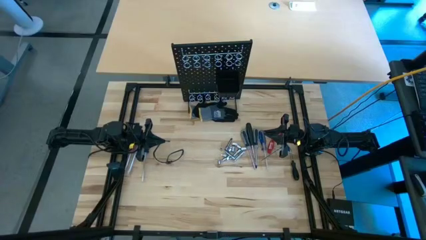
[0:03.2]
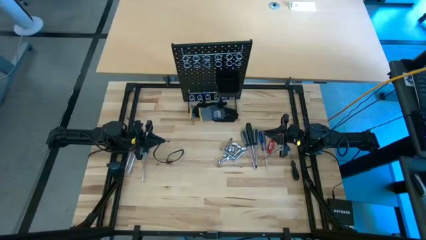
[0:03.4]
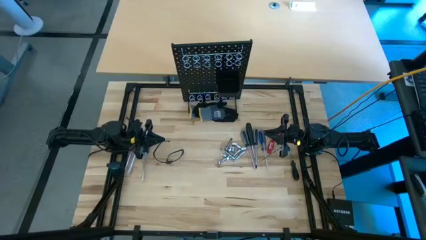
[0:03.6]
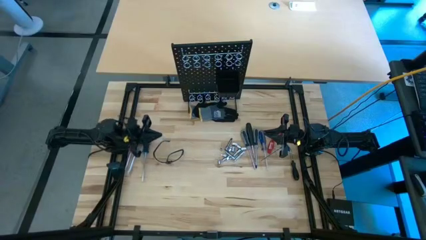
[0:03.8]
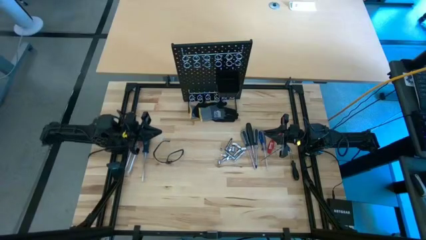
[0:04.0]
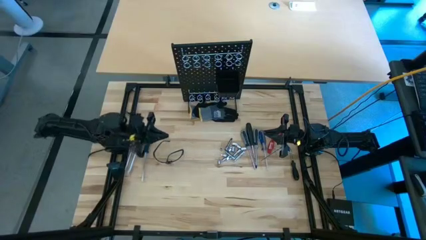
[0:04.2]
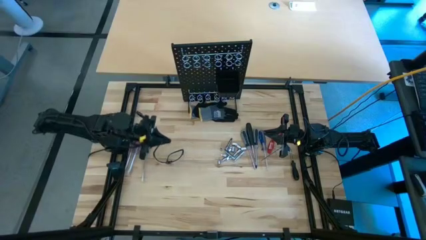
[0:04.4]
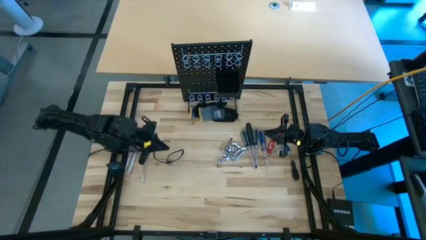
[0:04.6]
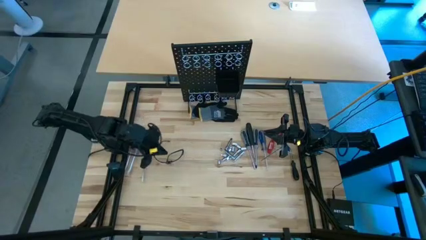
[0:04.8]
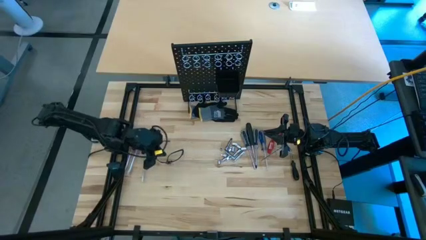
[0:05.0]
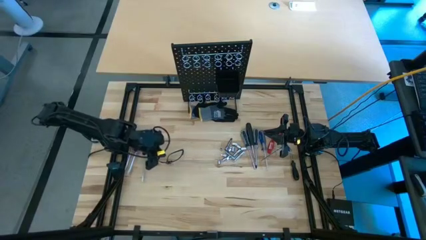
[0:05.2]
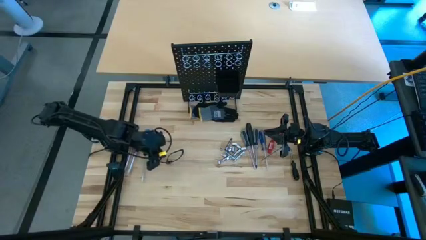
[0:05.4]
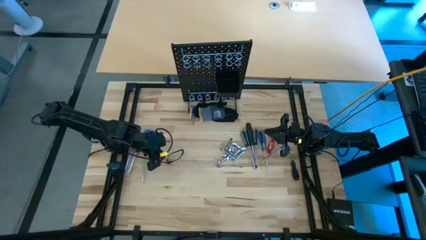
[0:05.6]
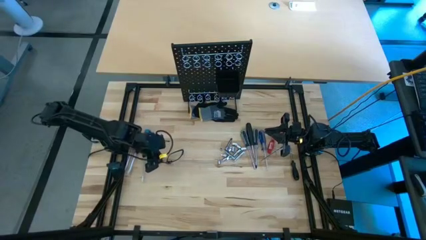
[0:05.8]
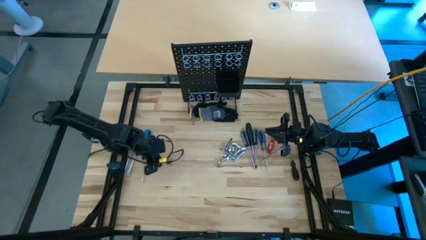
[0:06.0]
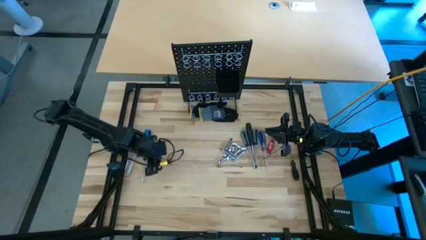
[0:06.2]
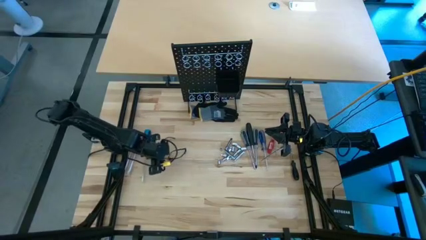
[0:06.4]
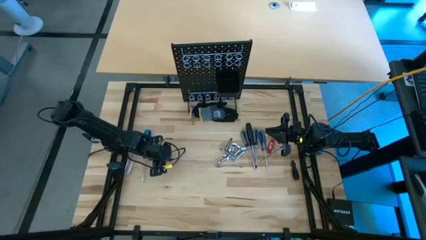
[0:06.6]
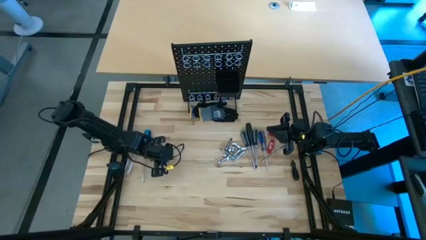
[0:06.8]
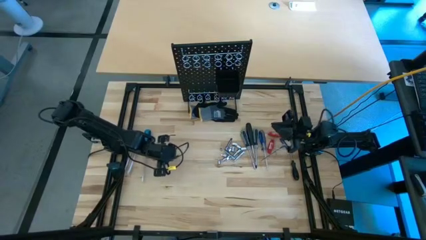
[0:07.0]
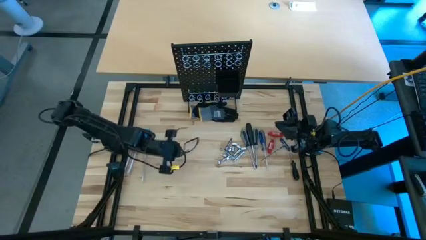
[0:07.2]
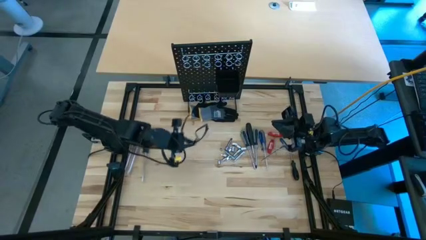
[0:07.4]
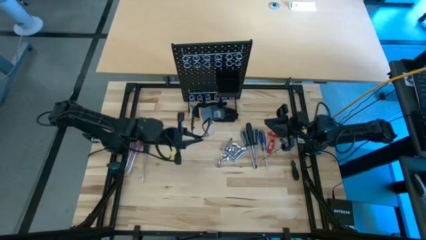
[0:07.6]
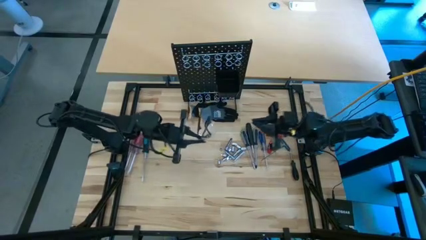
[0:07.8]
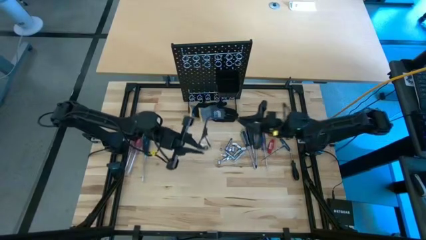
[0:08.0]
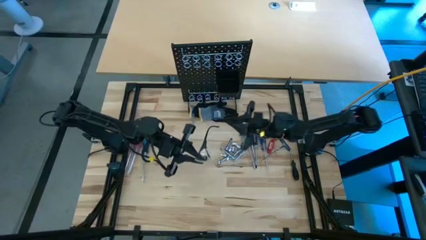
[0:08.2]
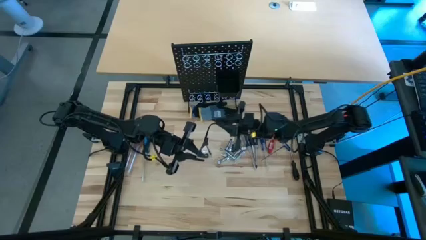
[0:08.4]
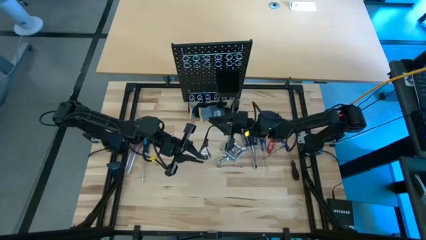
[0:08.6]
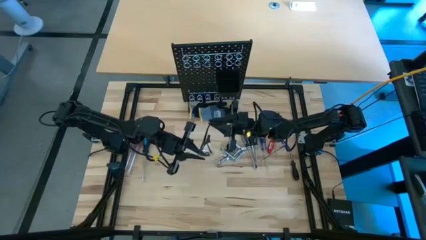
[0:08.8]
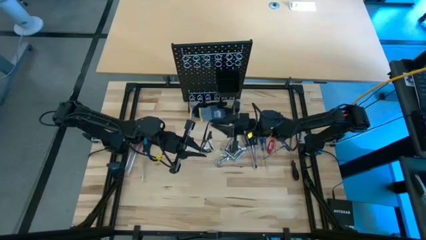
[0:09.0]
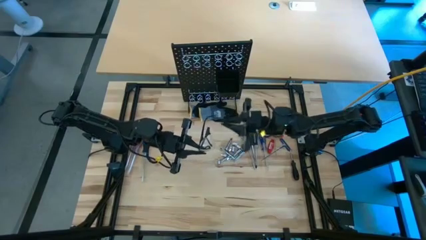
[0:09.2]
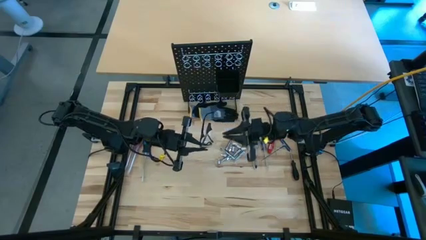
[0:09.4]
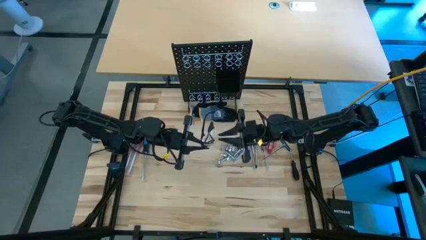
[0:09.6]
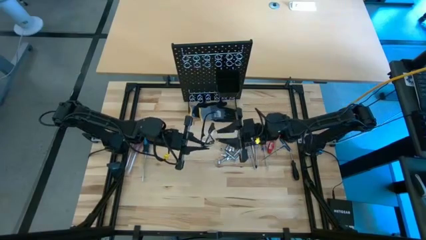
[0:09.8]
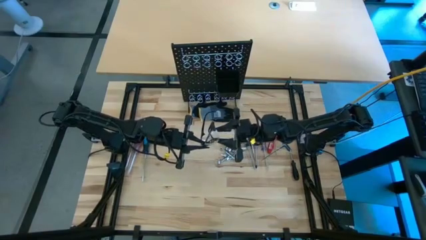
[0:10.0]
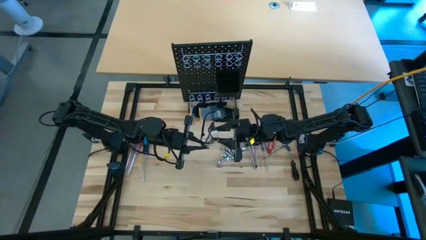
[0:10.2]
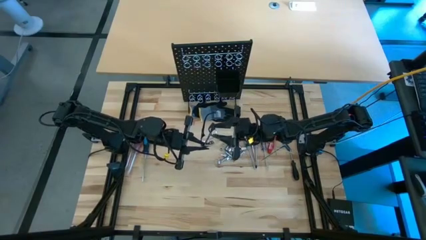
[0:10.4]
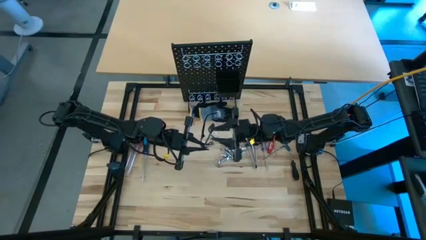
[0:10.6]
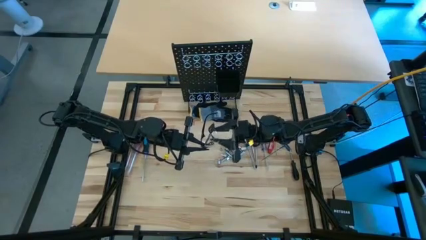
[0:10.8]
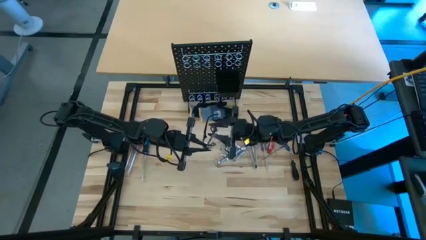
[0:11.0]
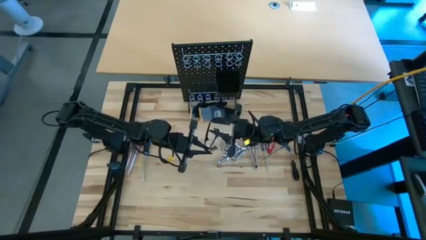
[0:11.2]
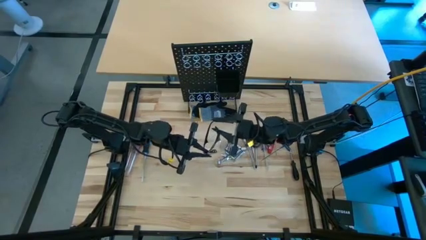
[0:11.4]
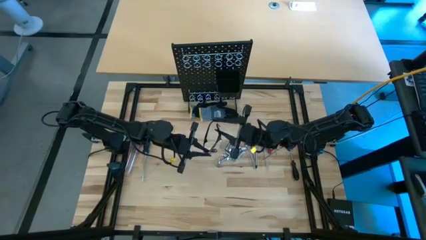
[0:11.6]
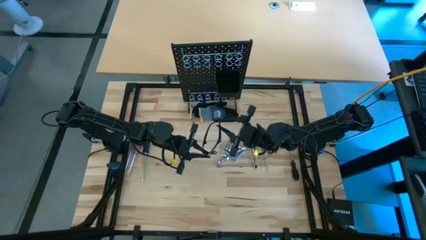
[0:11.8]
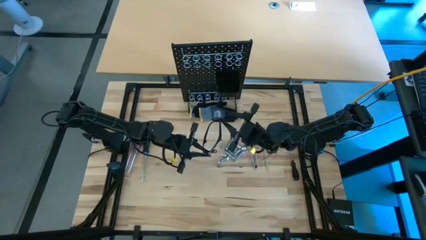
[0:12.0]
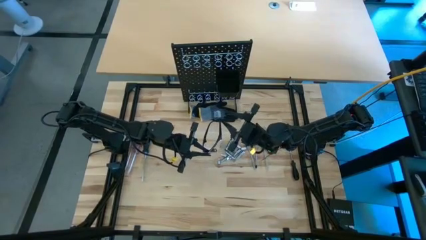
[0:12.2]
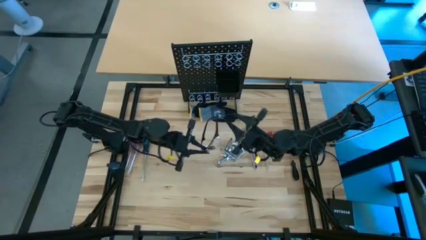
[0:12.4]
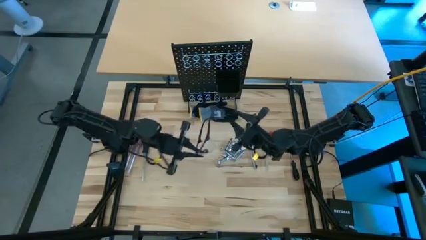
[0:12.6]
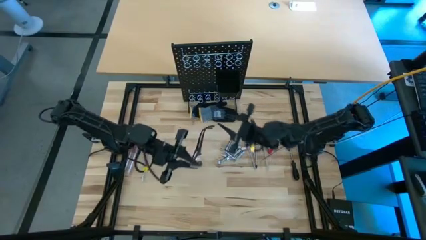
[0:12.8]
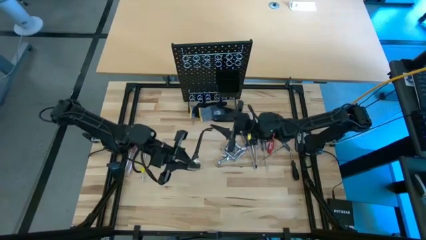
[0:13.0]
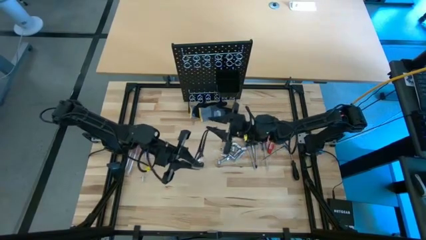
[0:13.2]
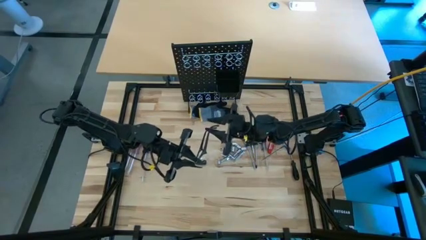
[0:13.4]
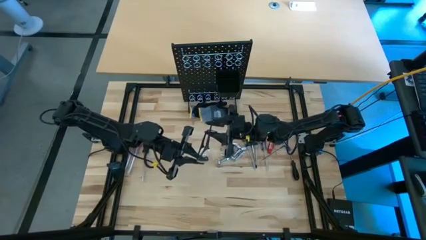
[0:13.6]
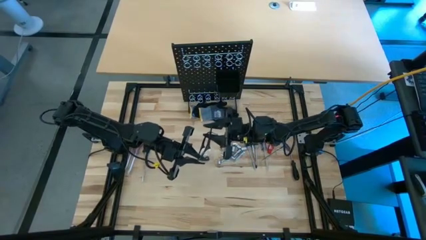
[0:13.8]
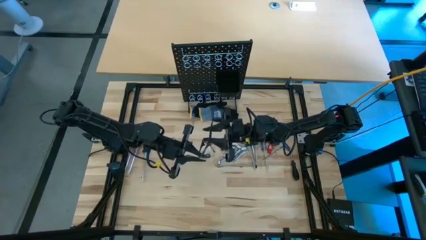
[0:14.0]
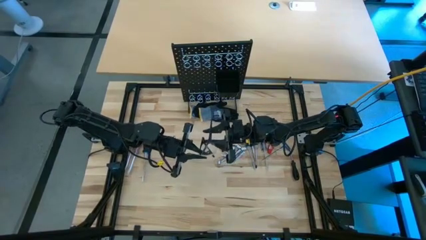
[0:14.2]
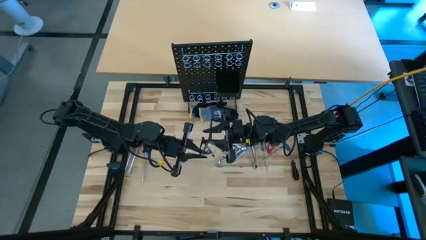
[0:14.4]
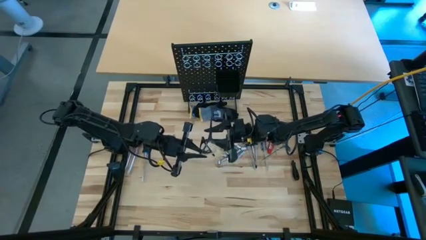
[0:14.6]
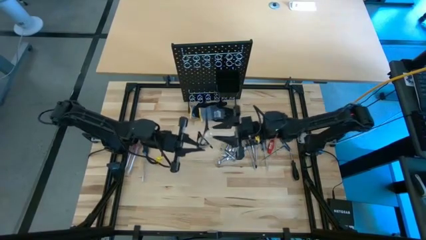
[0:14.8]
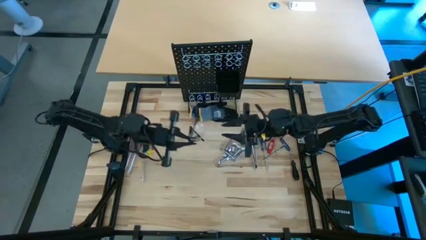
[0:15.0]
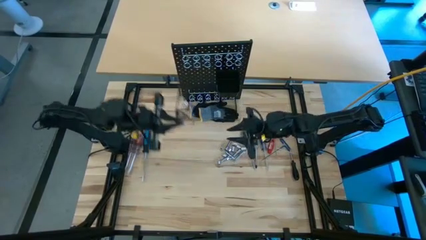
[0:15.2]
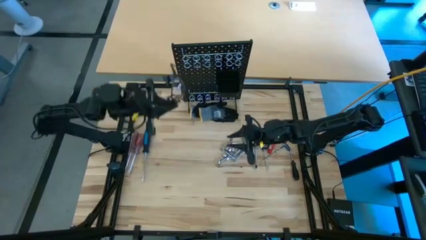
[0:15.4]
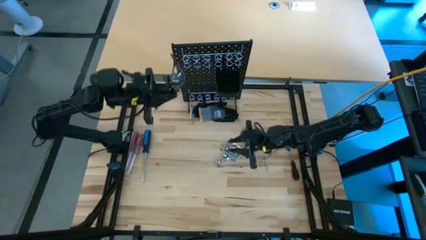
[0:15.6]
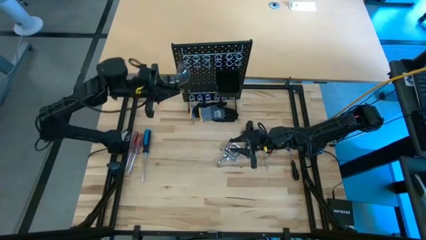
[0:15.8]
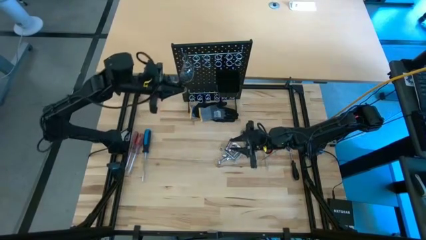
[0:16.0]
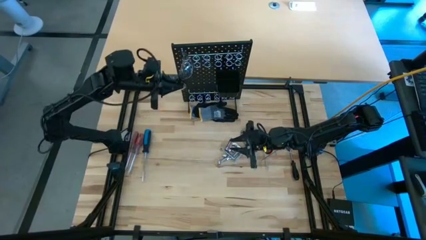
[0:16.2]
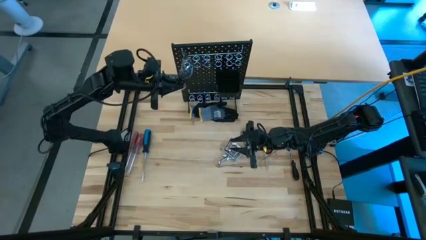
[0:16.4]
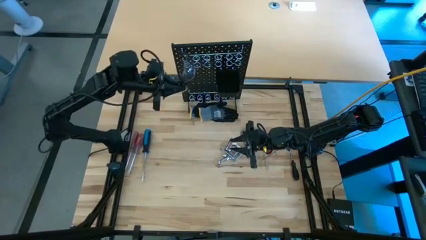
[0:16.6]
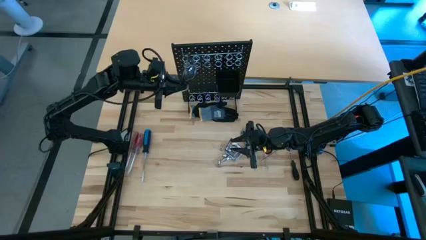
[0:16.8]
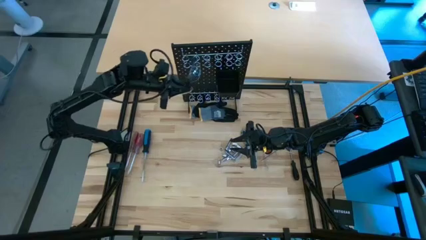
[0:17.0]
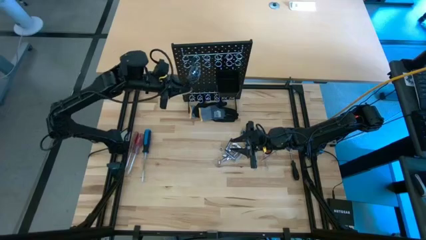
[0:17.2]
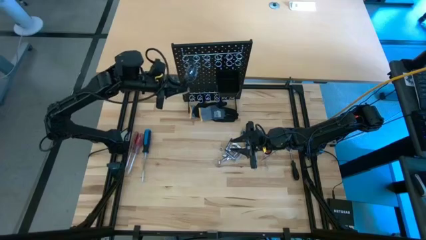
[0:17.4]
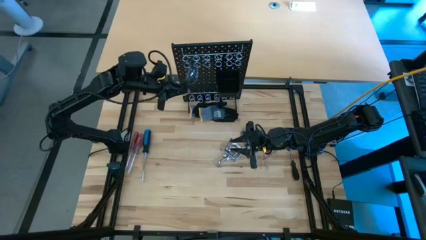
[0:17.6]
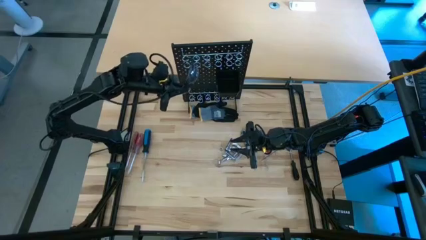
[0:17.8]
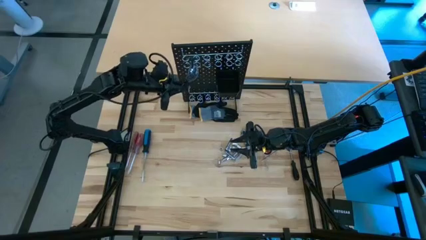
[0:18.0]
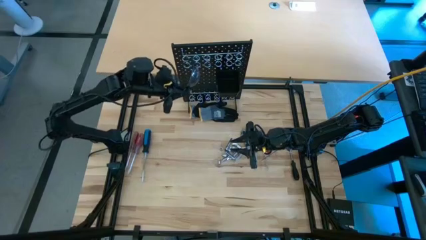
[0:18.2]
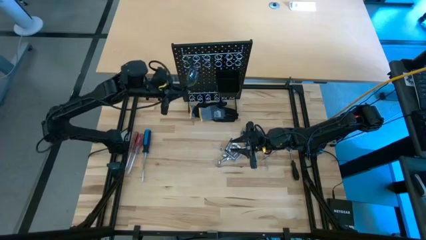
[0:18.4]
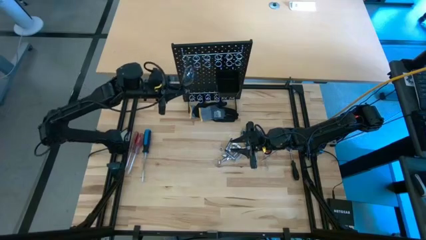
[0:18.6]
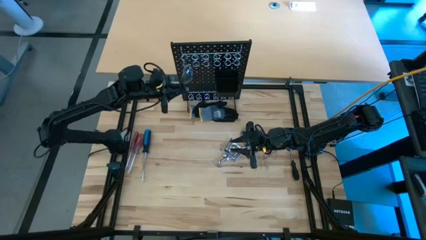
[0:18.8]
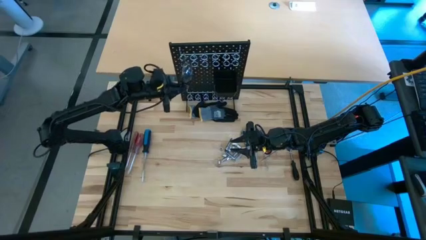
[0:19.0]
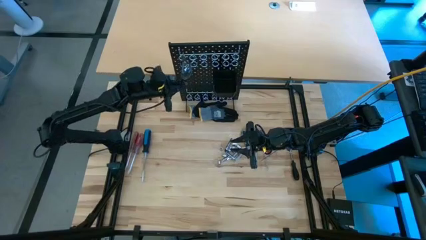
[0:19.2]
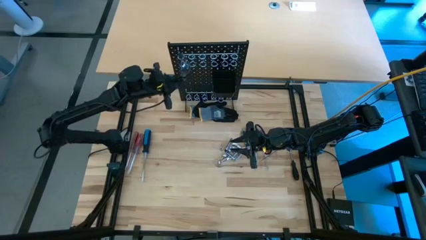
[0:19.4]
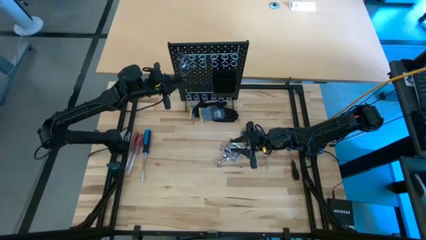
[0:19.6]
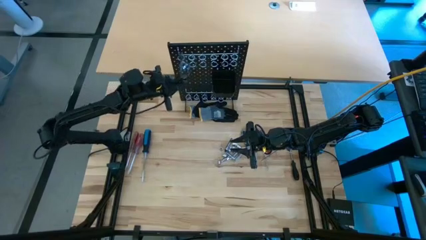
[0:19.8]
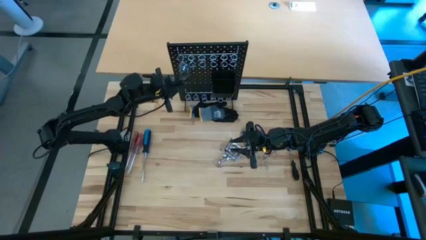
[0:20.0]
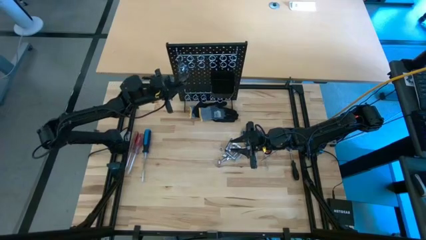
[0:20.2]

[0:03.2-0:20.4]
Task: Hang tools onto peg board
Hang the safety goggles on the pegboard
